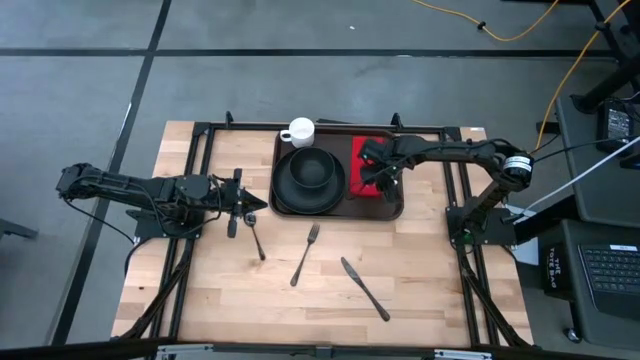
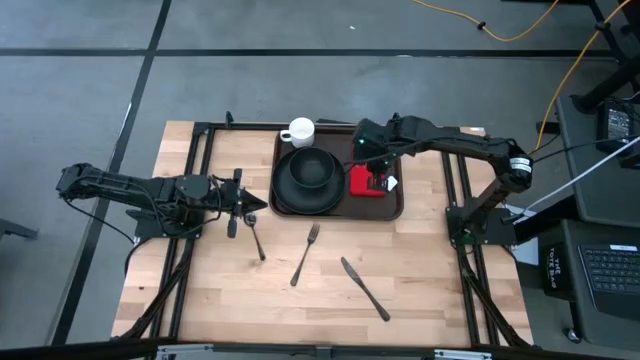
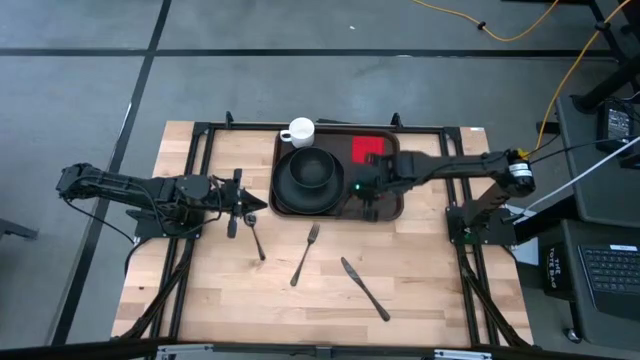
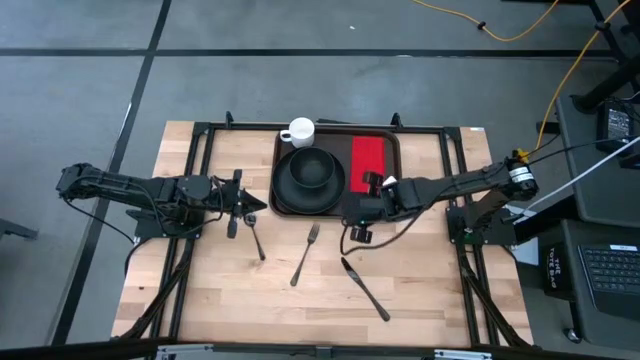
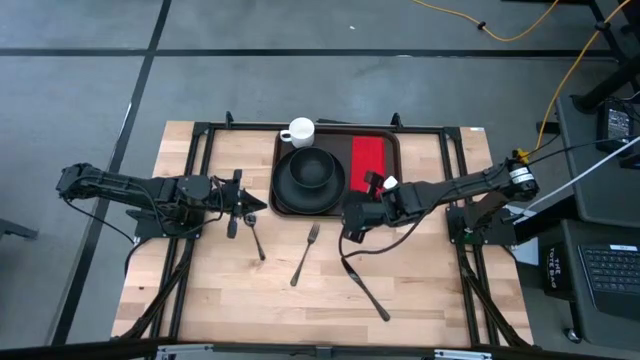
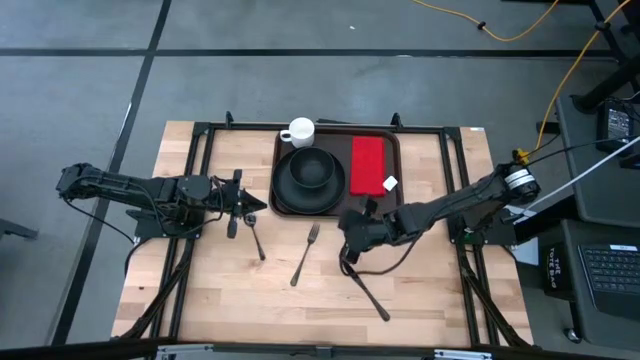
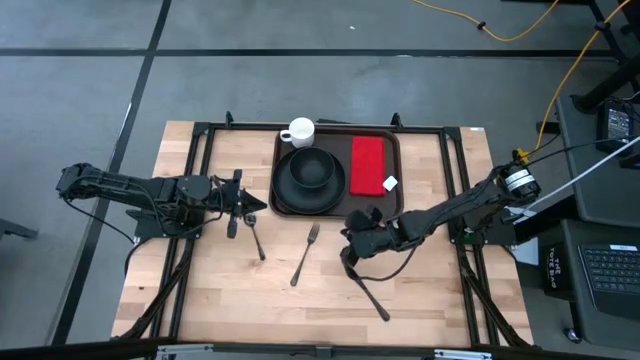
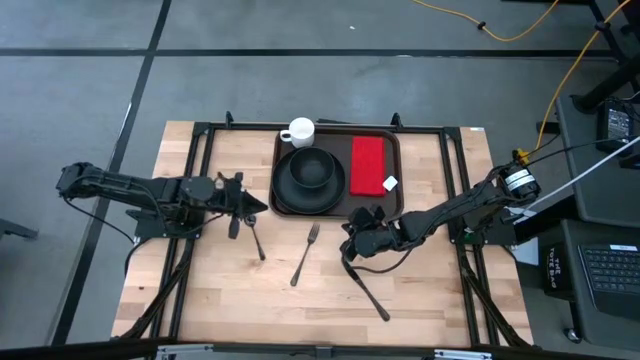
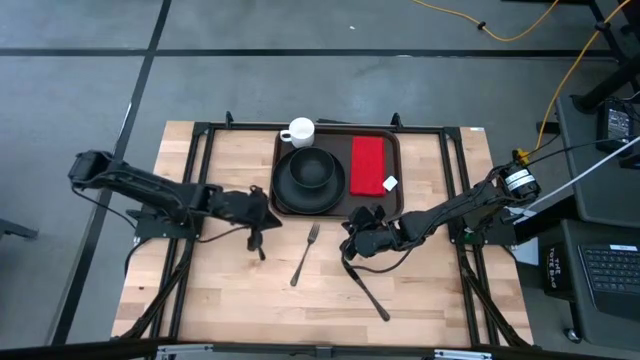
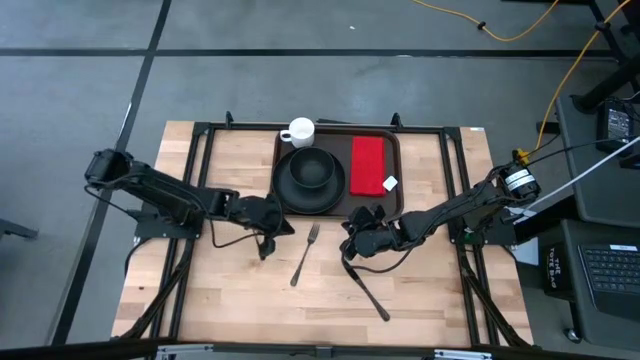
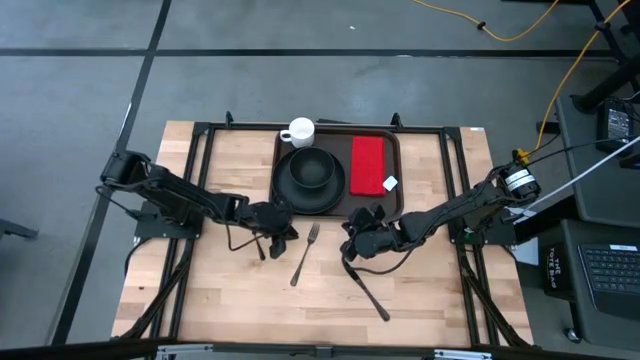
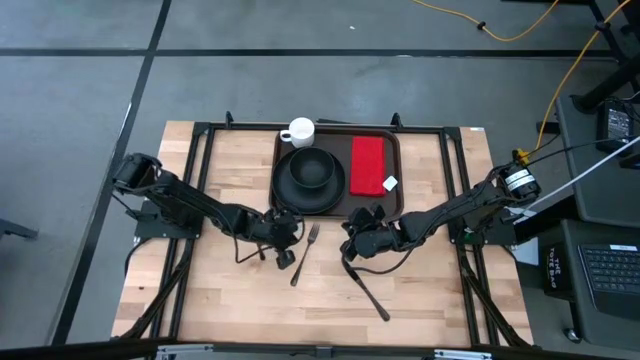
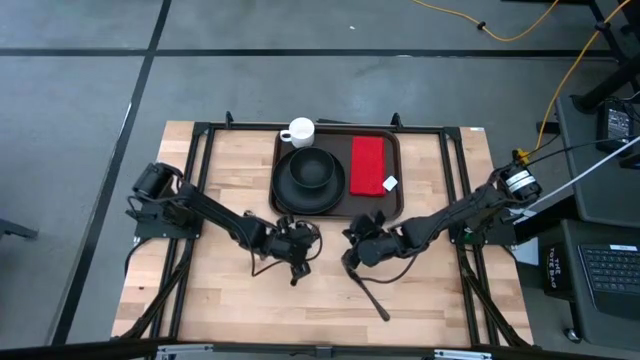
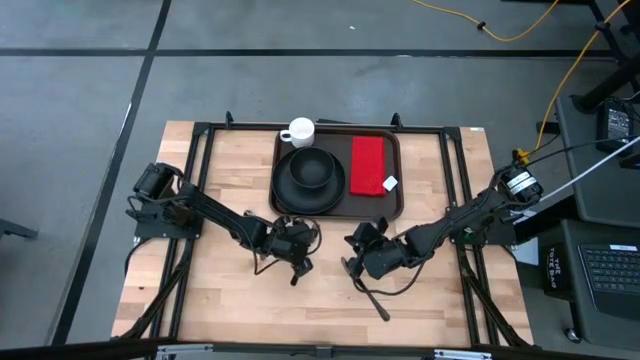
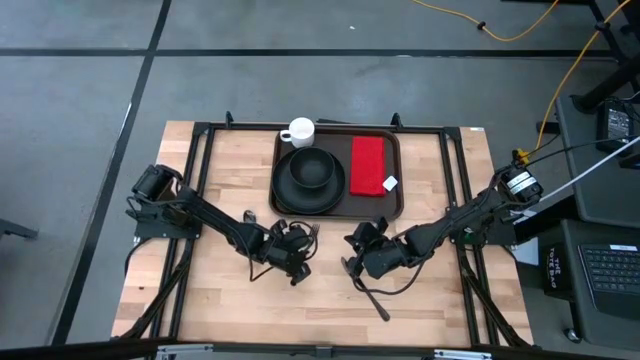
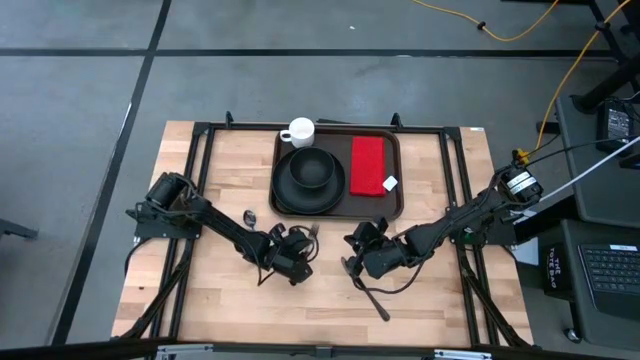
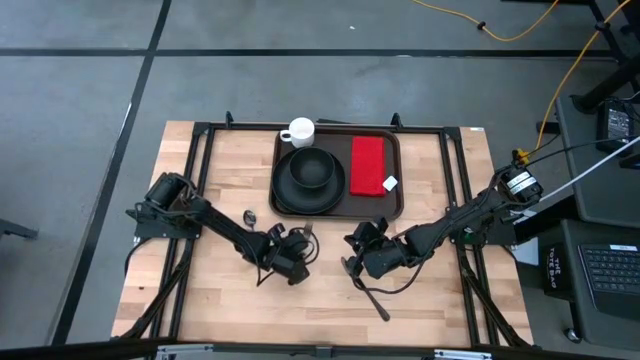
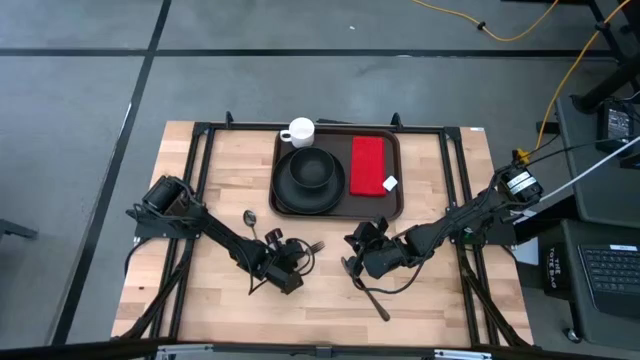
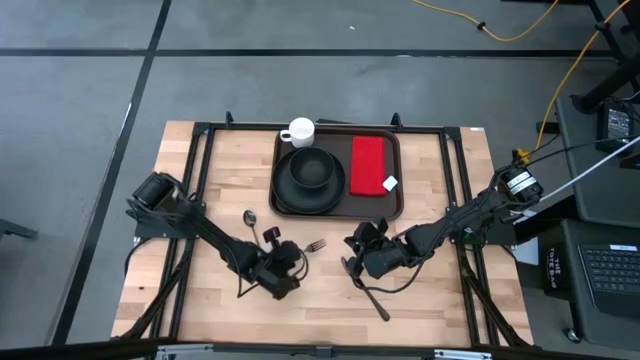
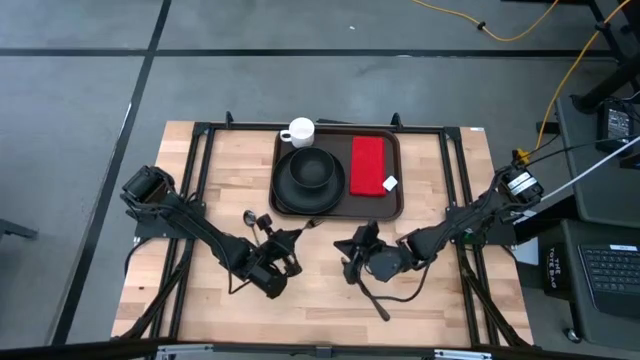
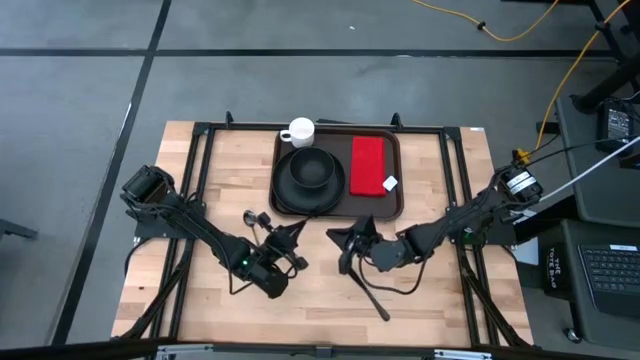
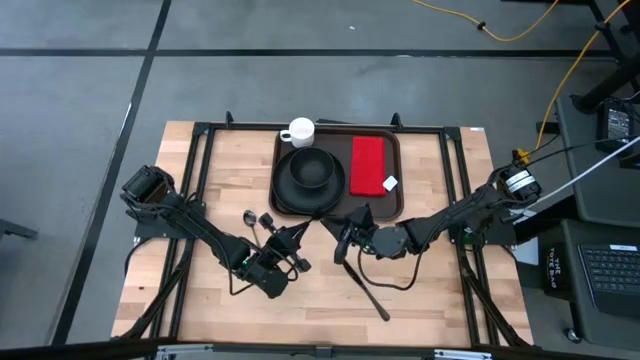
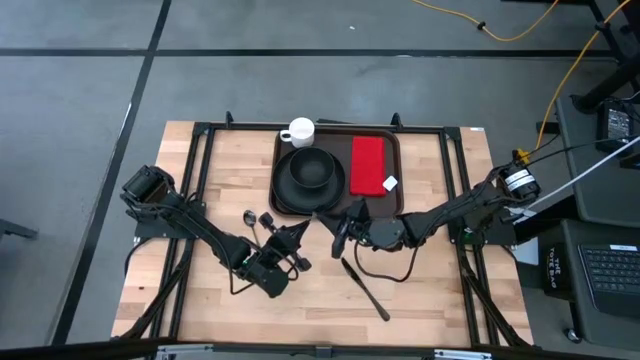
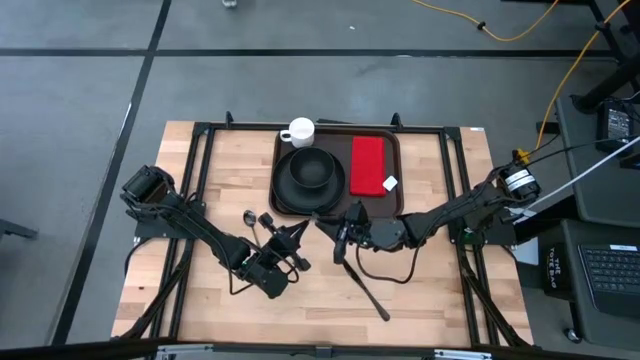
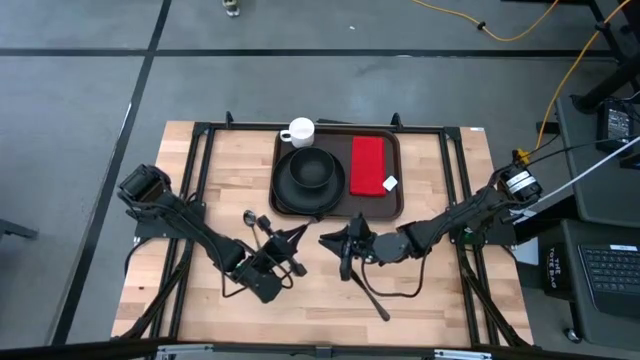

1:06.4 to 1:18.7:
Task: Set up tray
Put the black fork on the red napkin on the brown serving tray

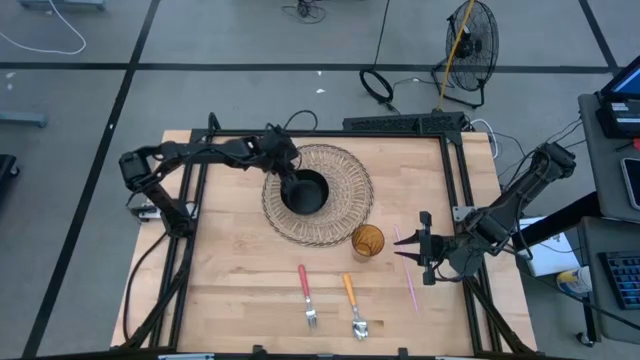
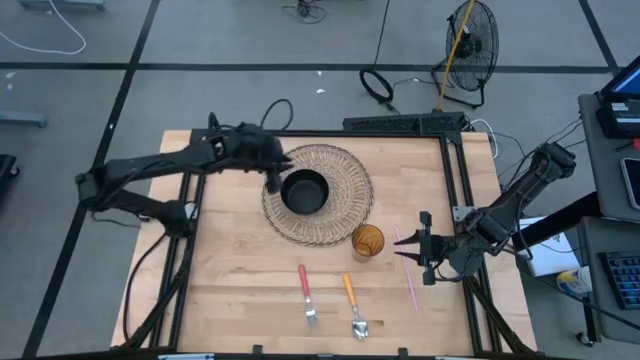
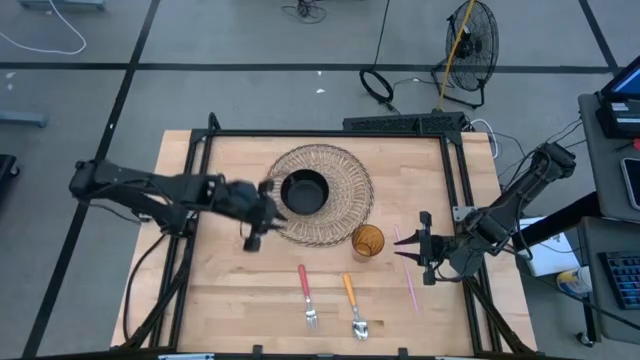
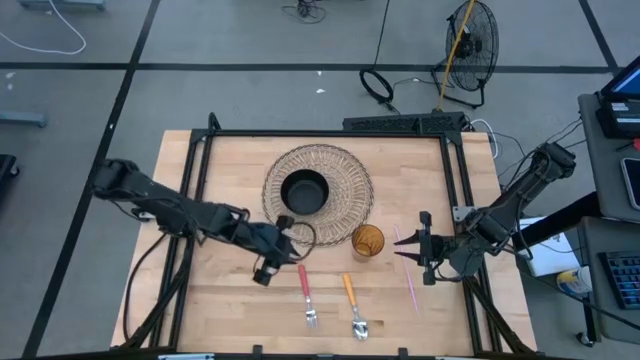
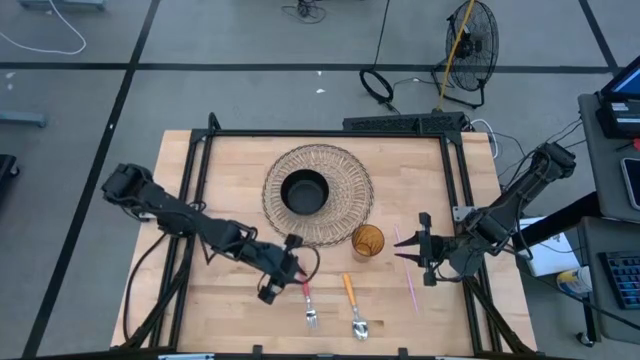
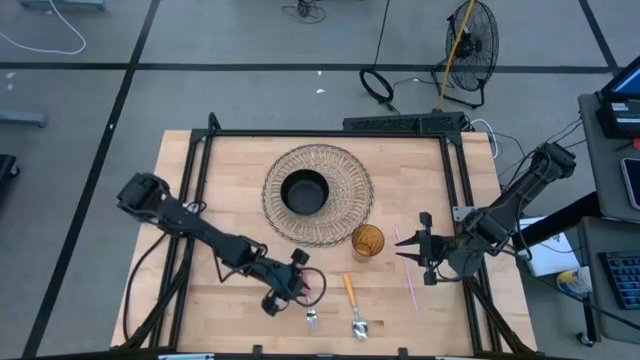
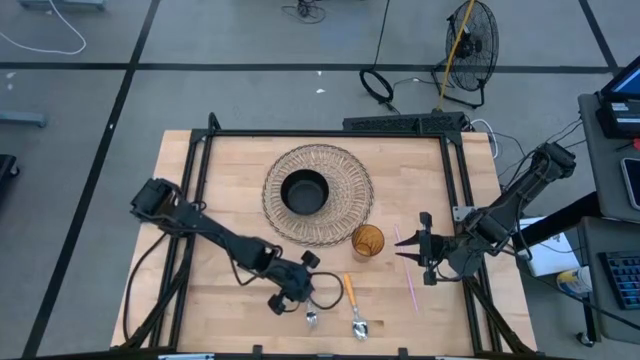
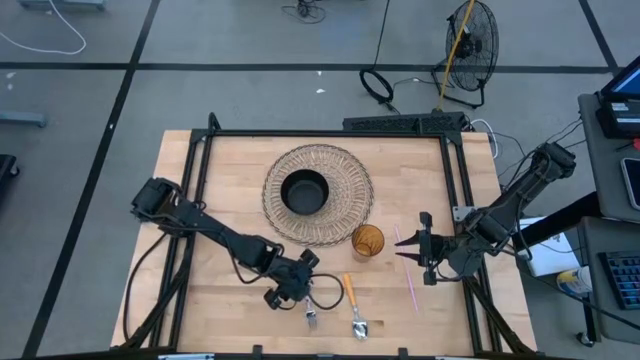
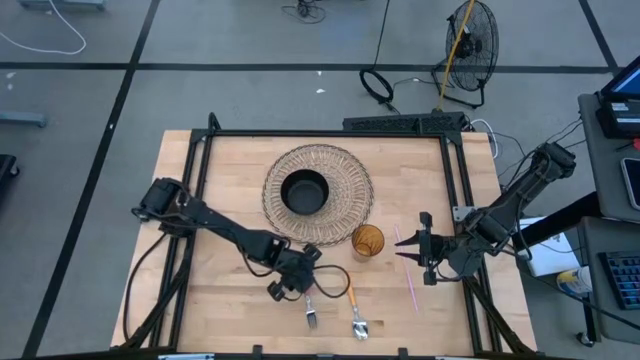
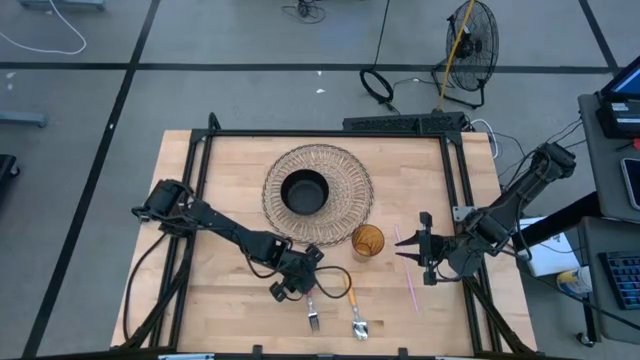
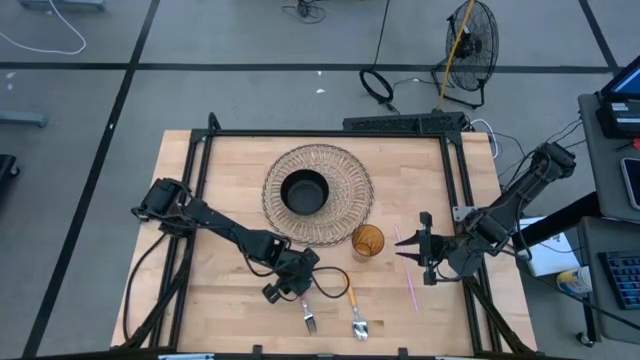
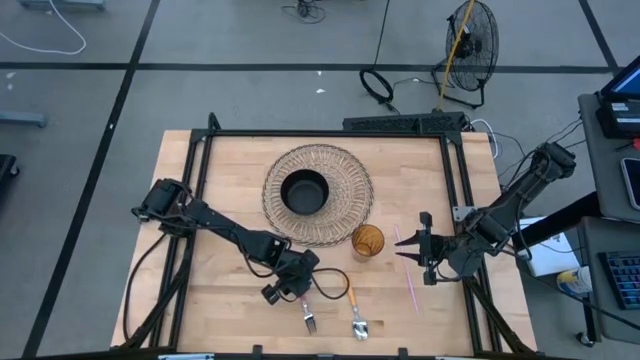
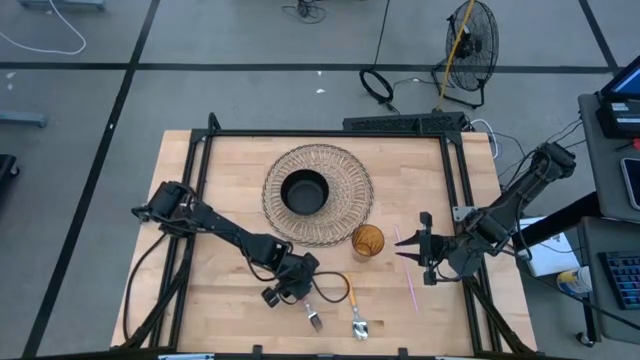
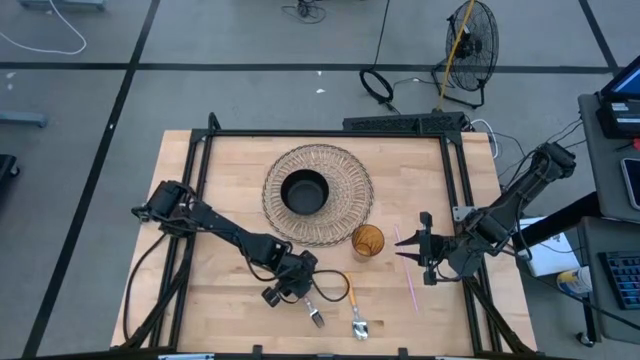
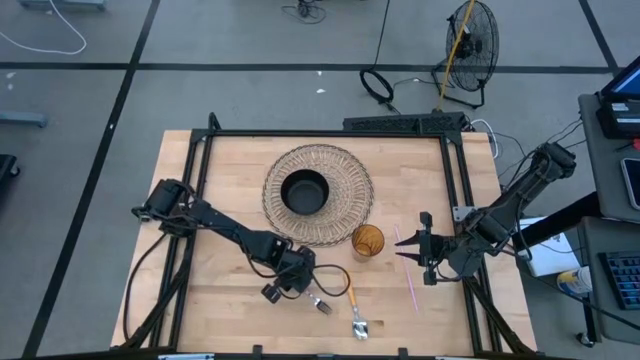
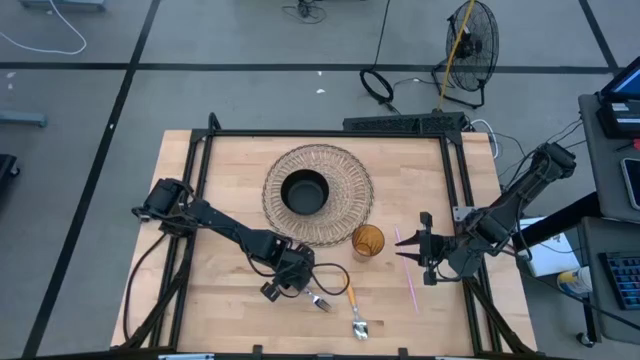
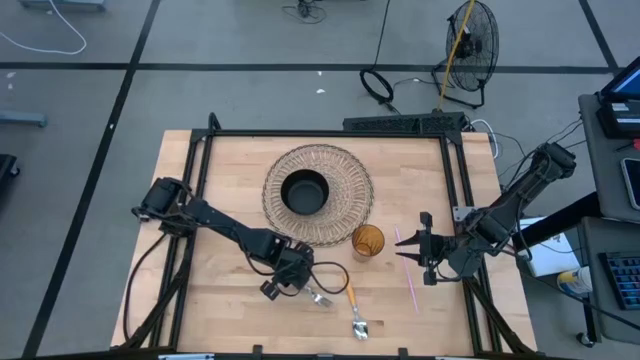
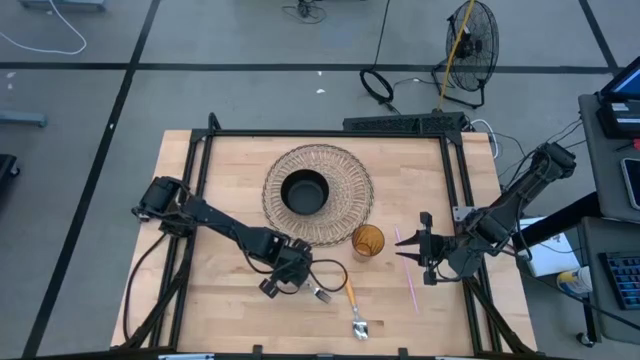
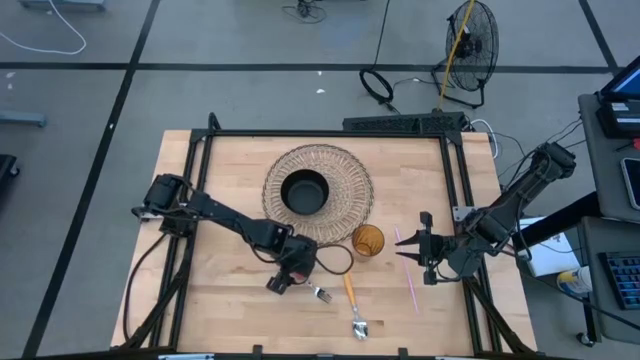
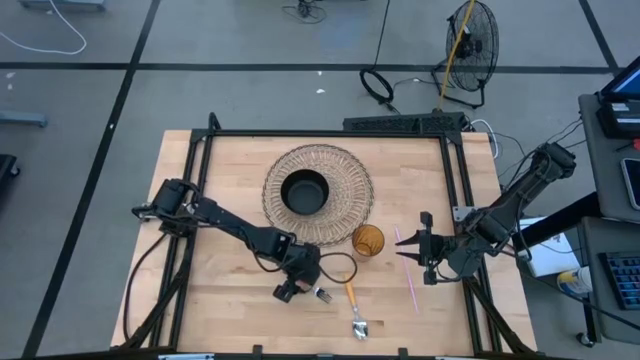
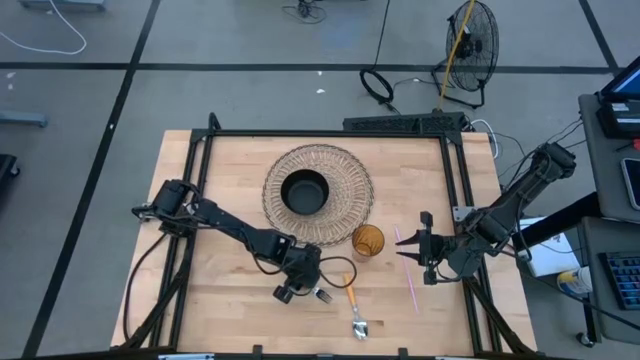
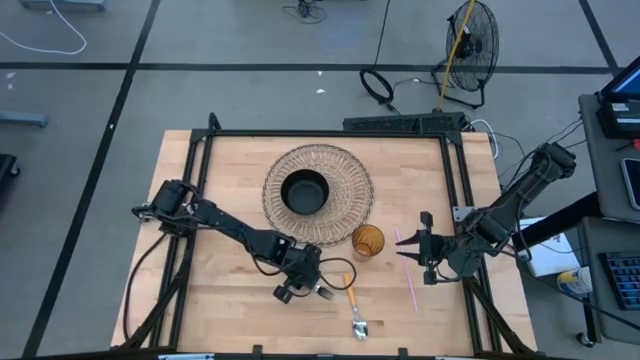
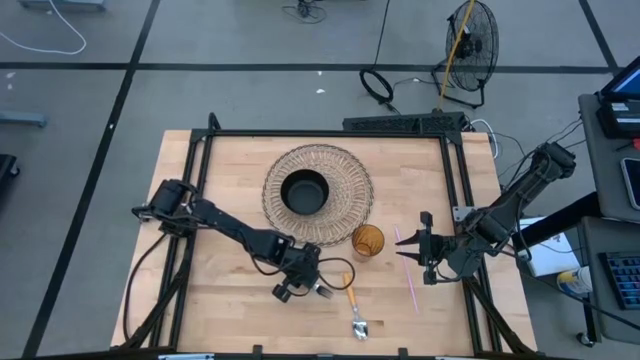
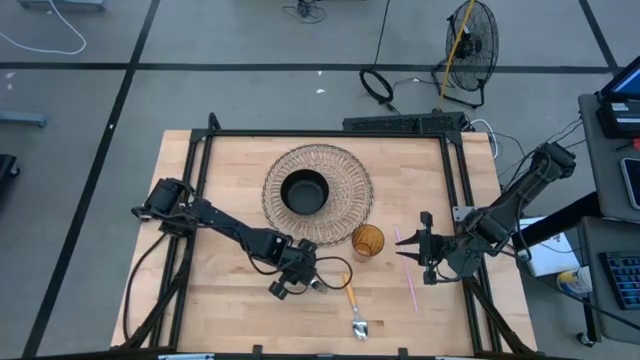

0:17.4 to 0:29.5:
Task: Pick & Place Utensil
Put the pink fork into the black bowl on the woven mat
